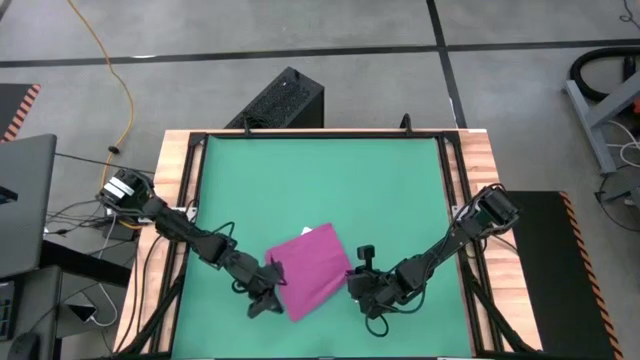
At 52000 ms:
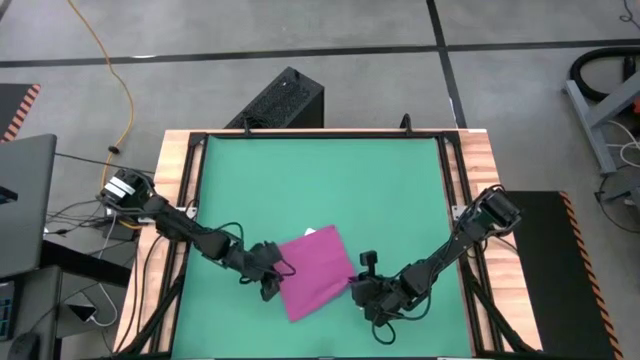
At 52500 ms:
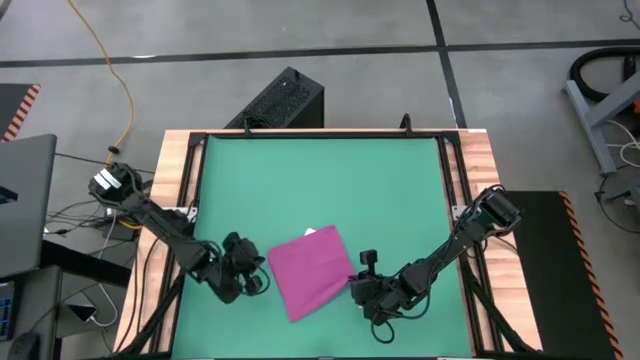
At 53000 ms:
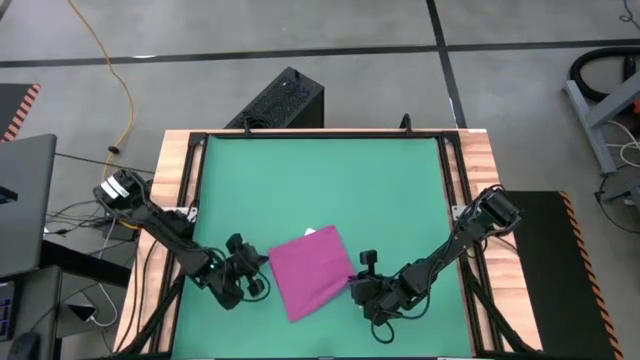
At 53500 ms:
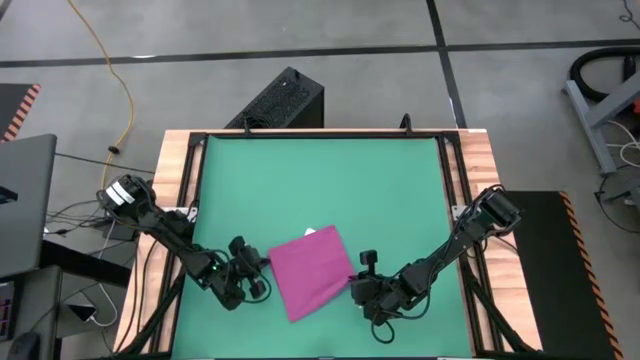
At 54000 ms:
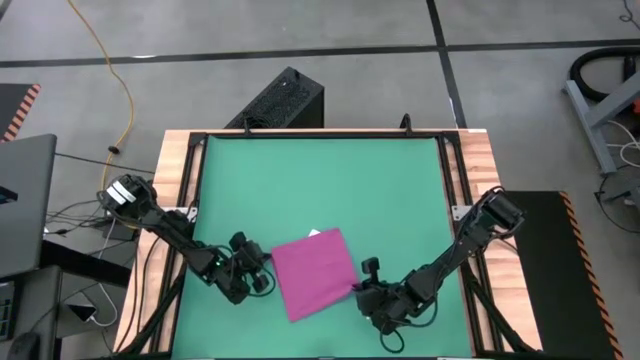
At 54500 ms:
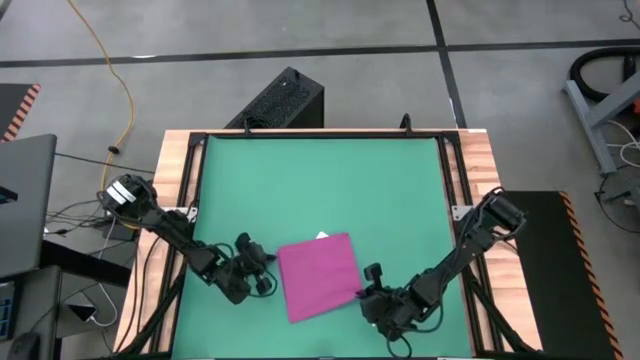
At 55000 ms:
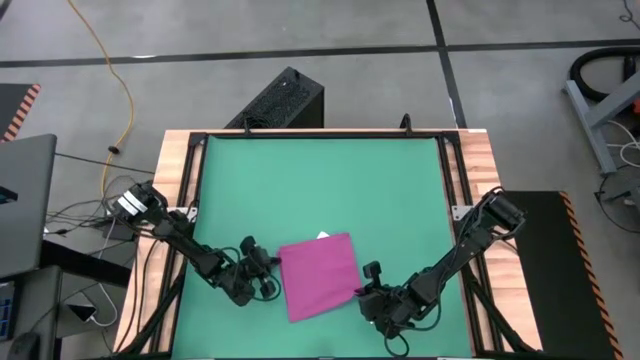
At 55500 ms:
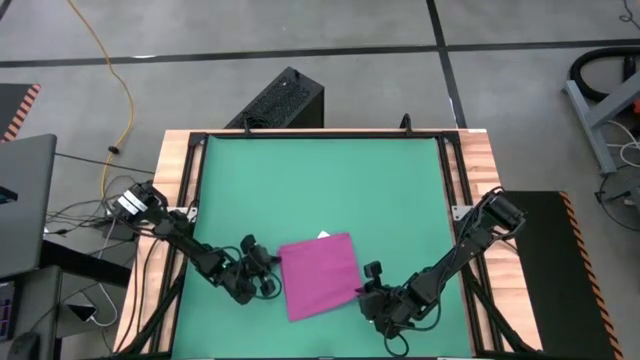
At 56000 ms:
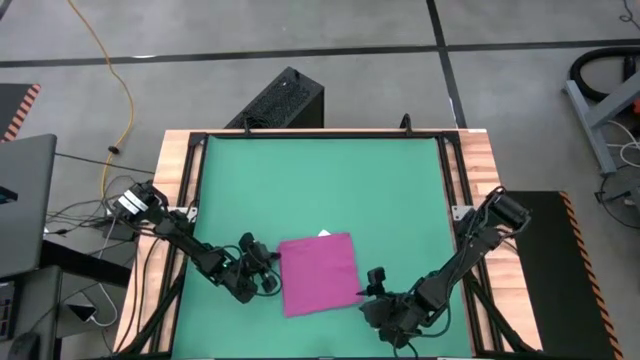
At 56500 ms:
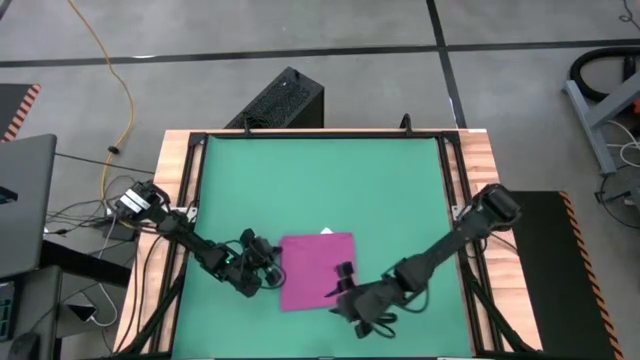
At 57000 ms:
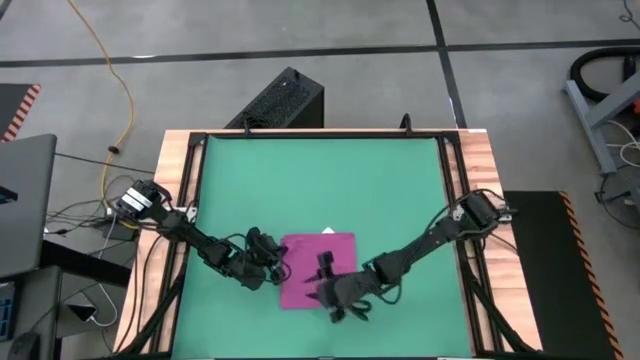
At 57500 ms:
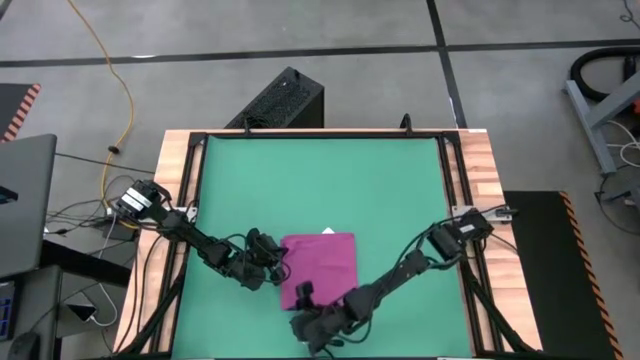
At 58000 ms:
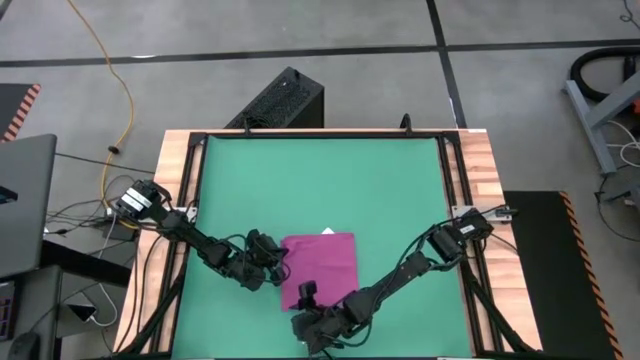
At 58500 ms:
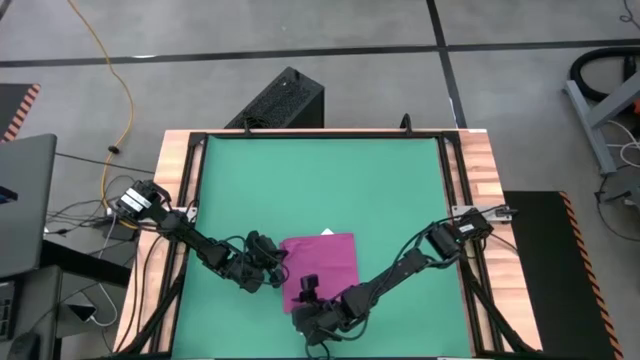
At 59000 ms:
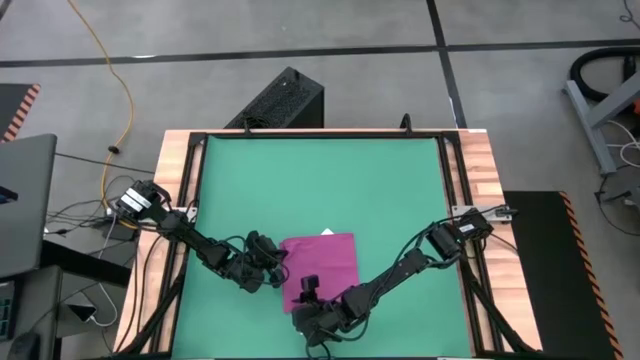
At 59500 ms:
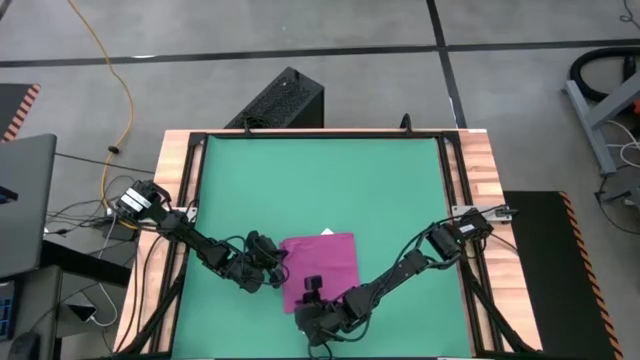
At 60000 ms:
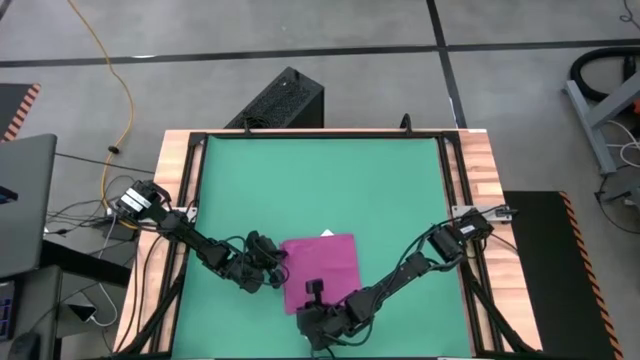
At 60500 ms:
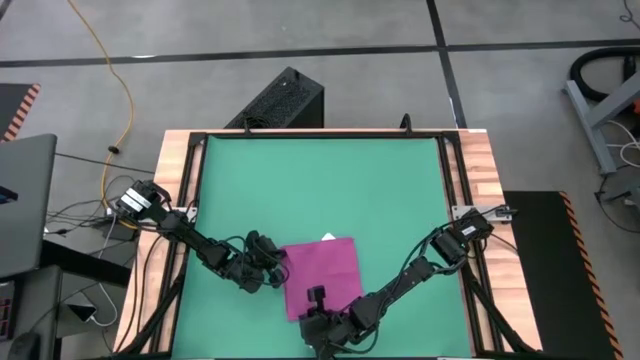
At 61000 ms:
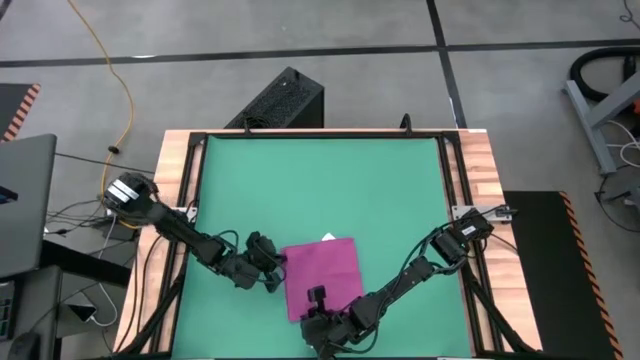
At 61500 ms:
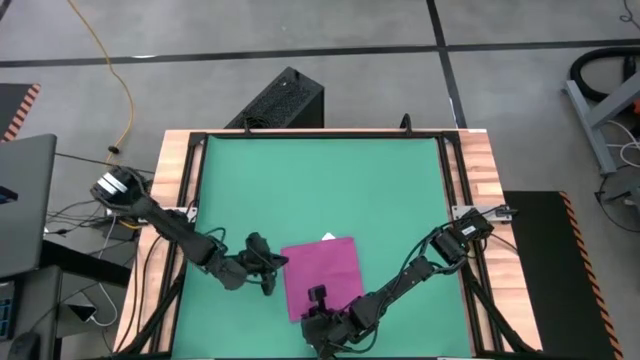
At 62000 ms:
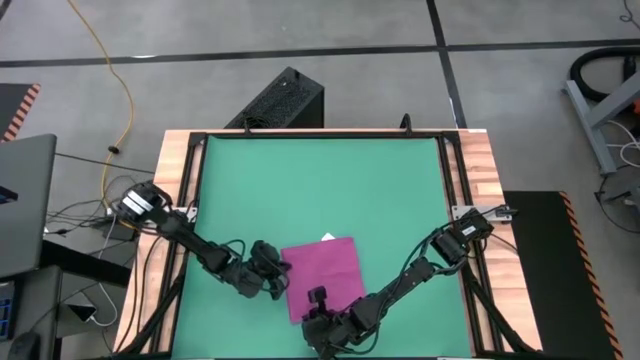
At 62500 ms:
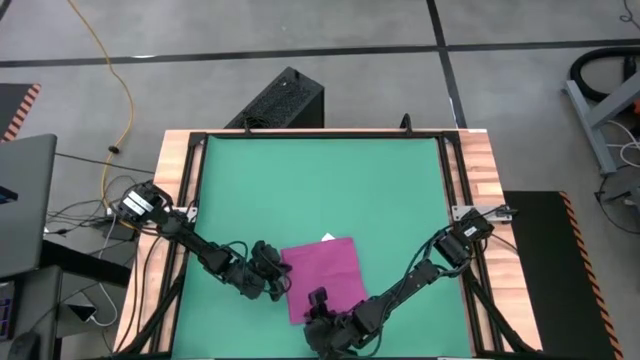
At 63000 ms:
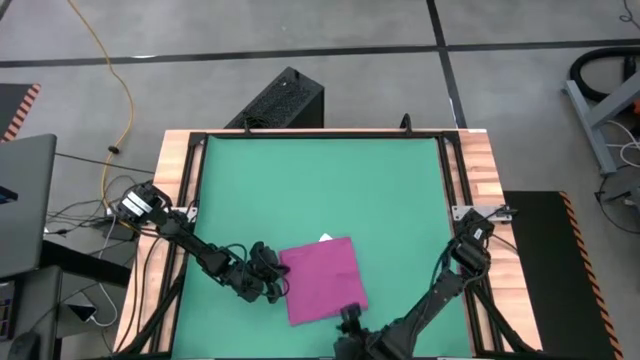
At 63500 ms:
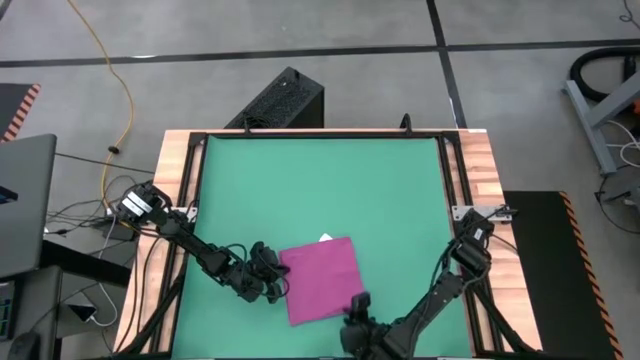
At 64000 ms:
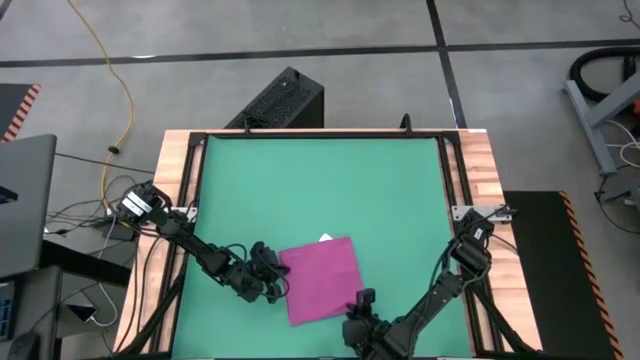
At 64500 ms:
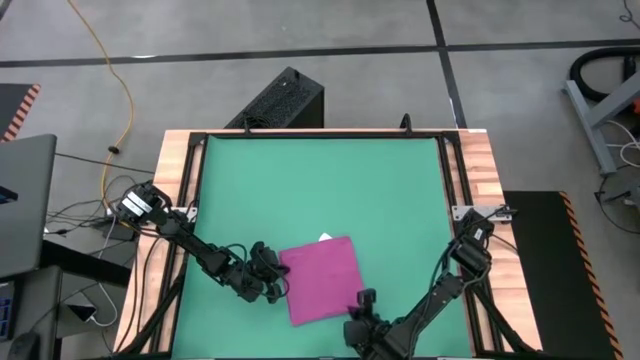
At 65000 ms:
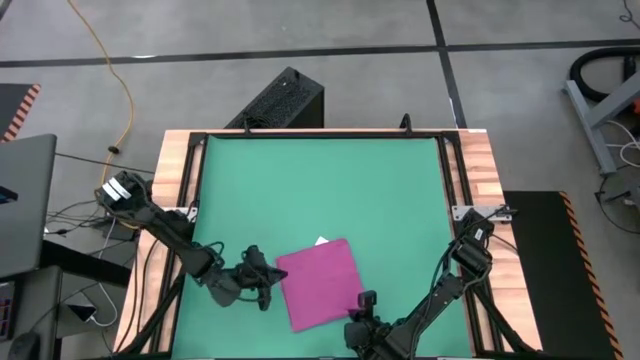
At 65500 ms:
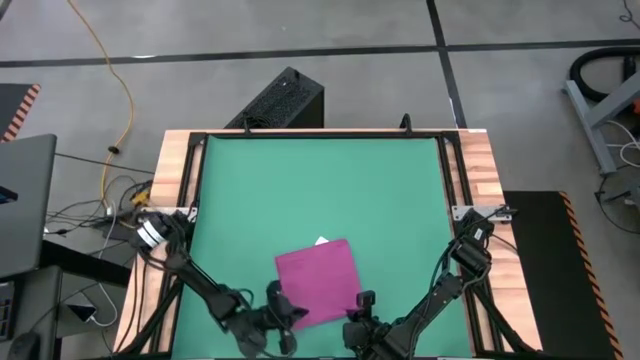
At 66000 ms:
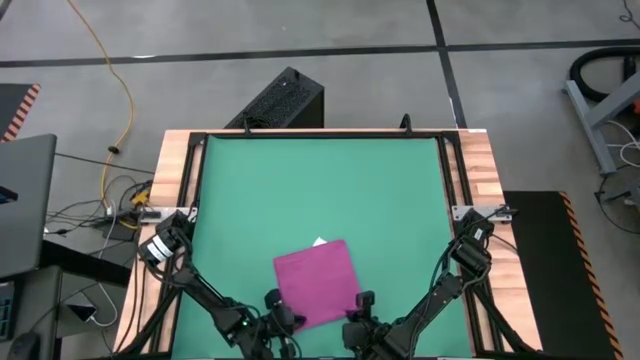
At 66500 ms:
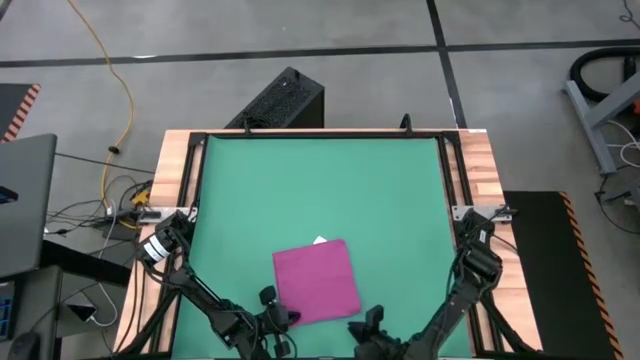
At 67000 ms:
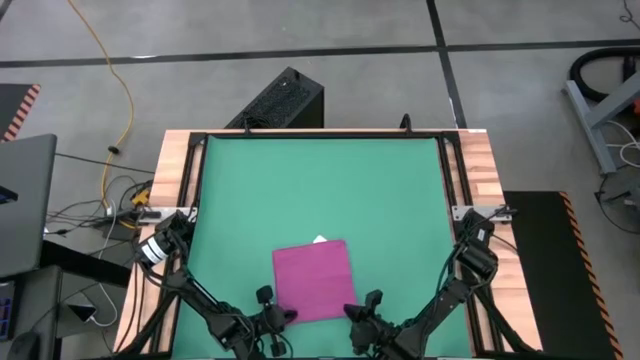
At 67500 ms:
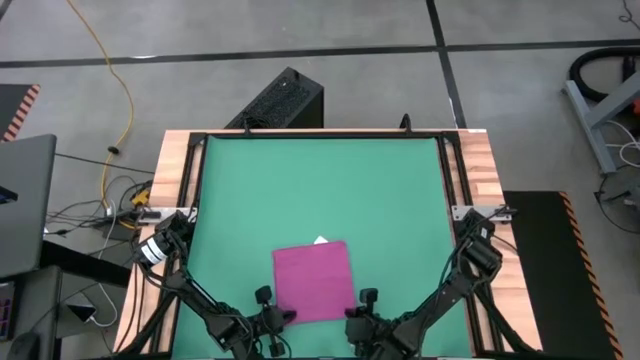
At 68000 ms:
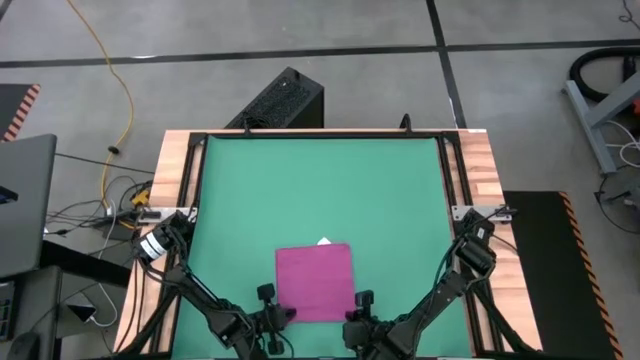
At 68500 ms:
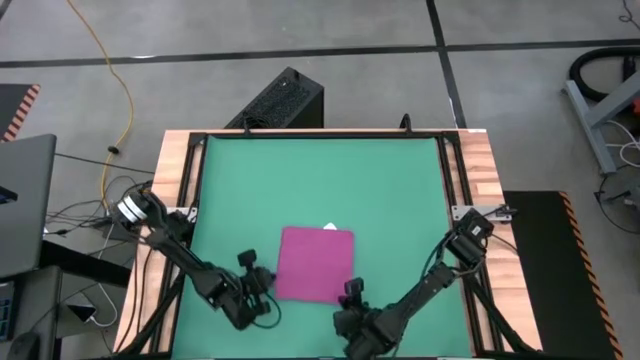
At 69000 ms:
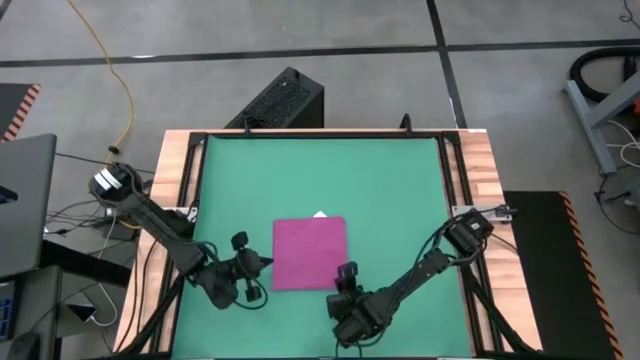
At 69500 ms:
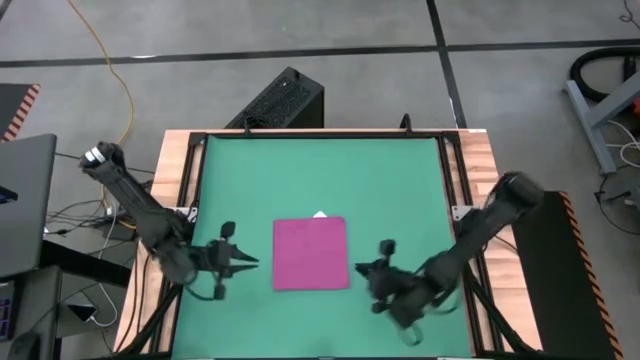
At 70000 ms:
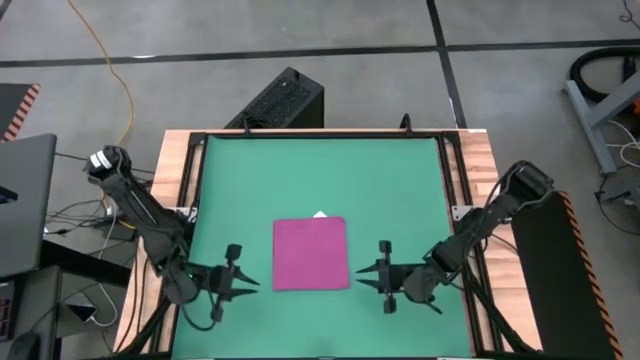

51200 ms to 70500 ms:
Task: Roll towel
Roll the violet towel
